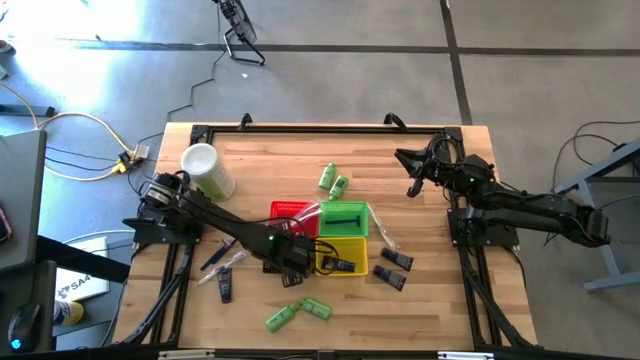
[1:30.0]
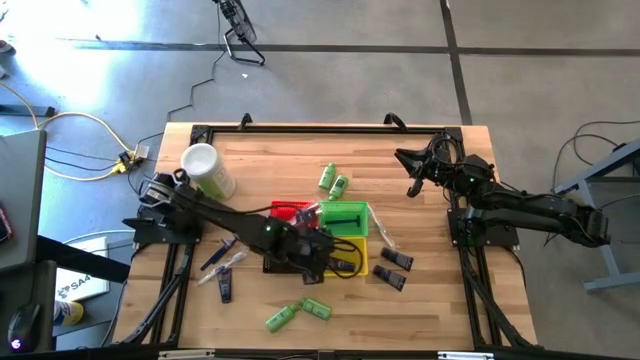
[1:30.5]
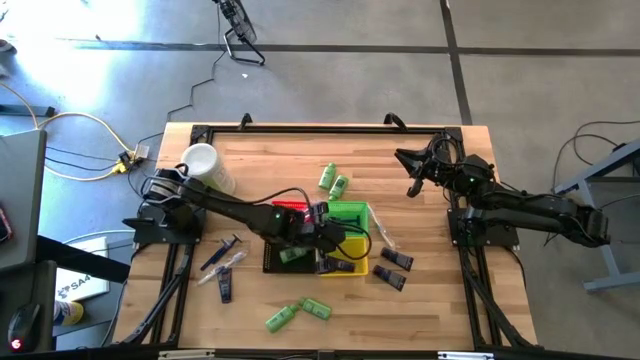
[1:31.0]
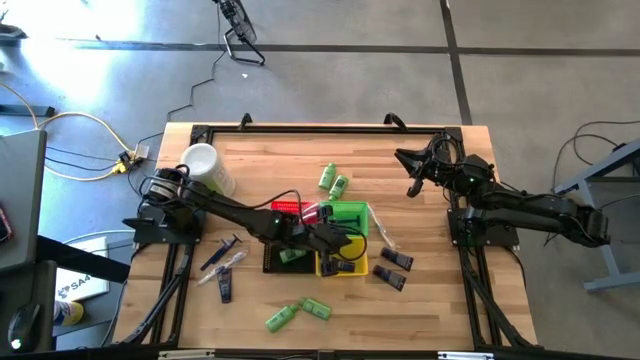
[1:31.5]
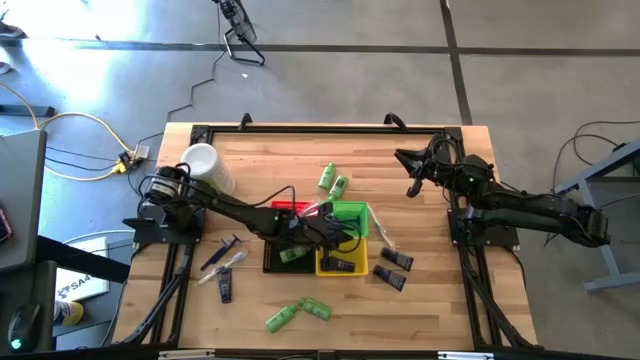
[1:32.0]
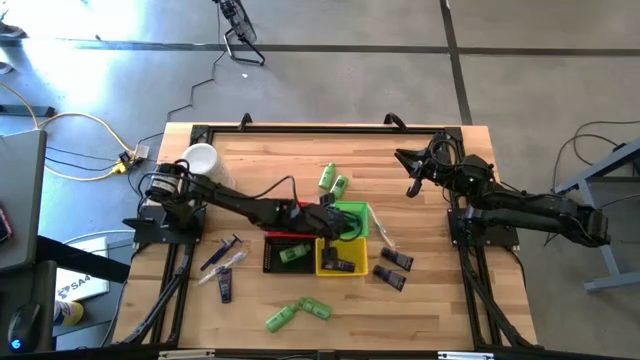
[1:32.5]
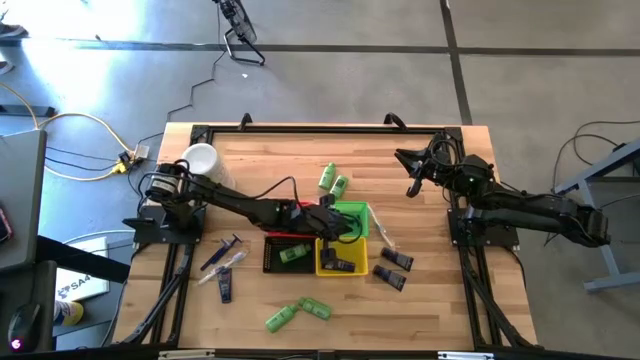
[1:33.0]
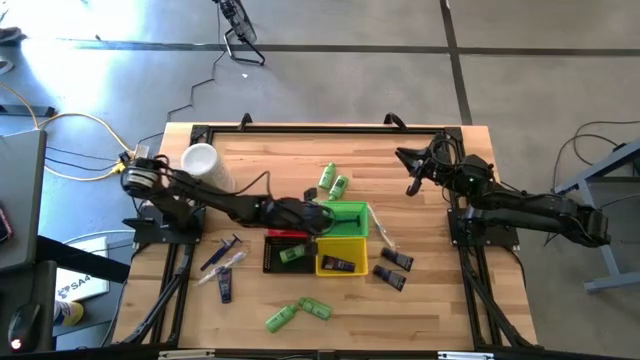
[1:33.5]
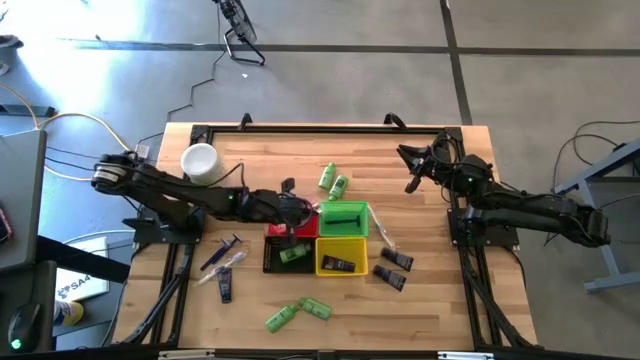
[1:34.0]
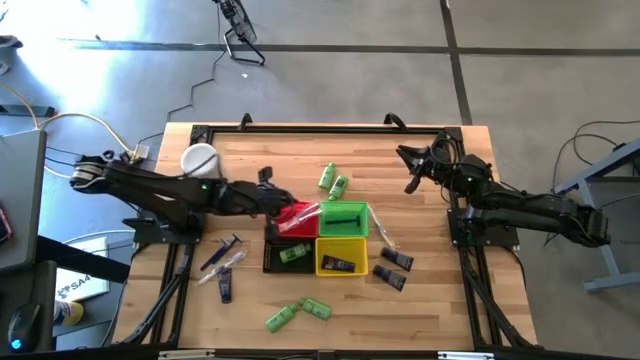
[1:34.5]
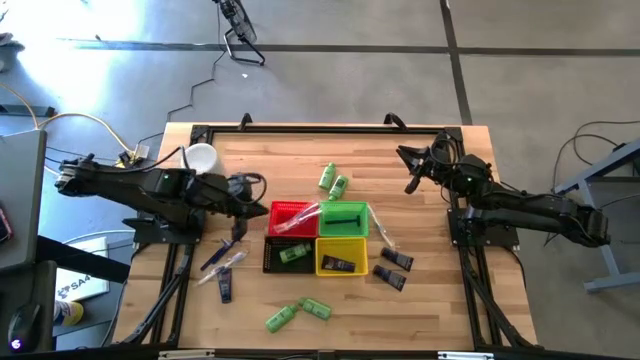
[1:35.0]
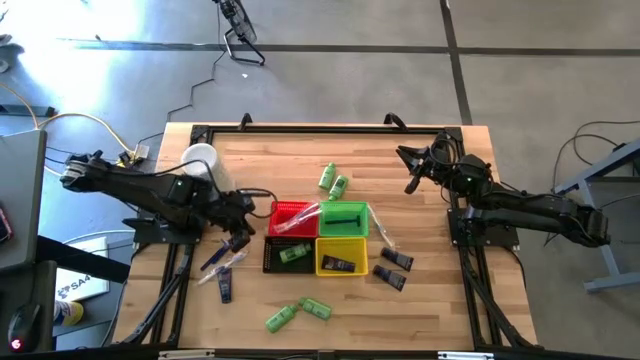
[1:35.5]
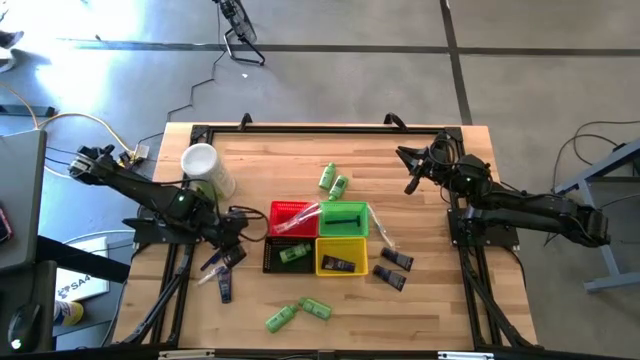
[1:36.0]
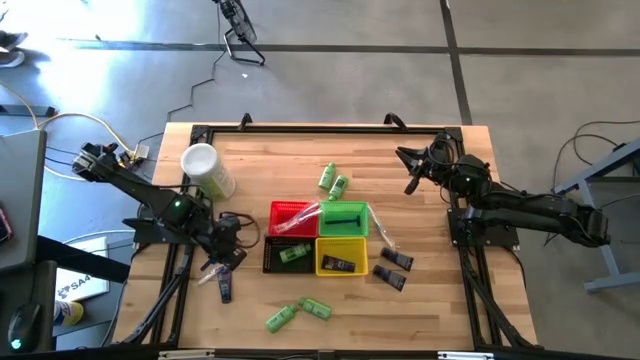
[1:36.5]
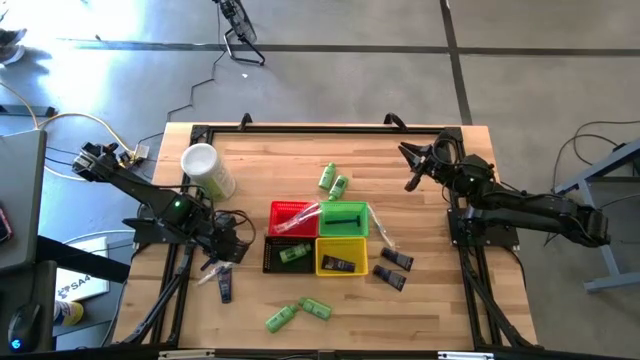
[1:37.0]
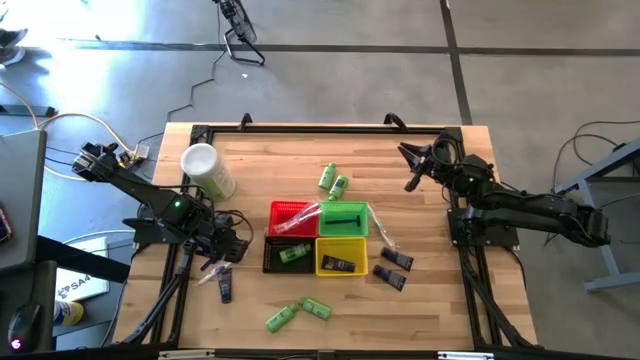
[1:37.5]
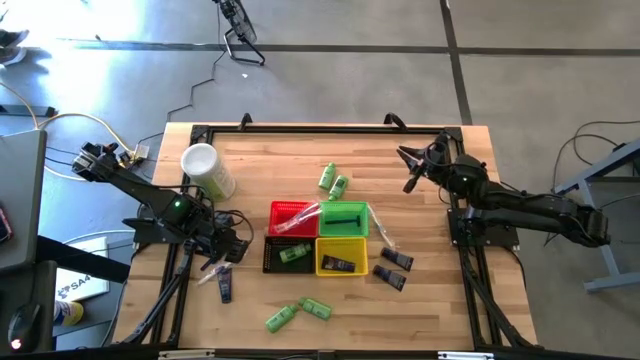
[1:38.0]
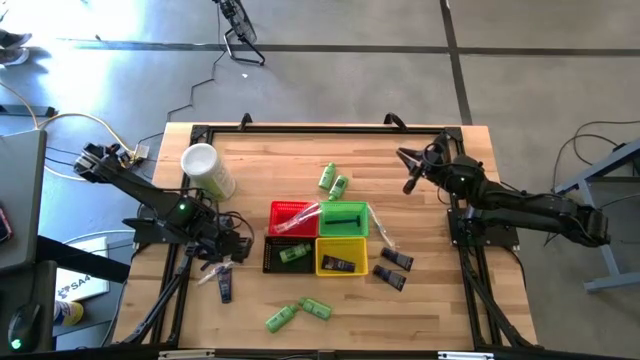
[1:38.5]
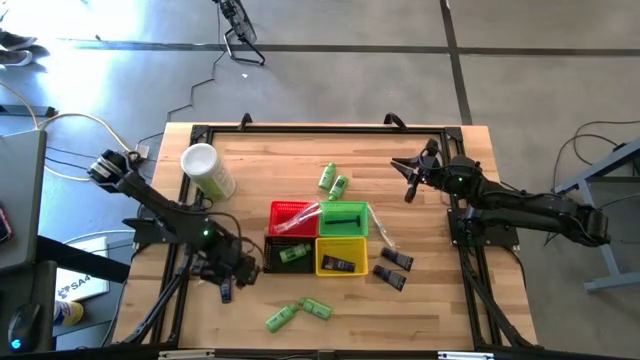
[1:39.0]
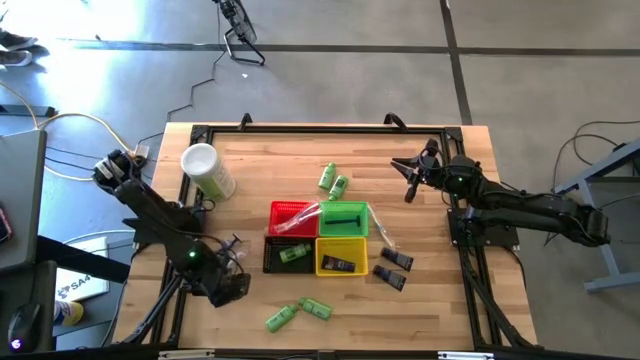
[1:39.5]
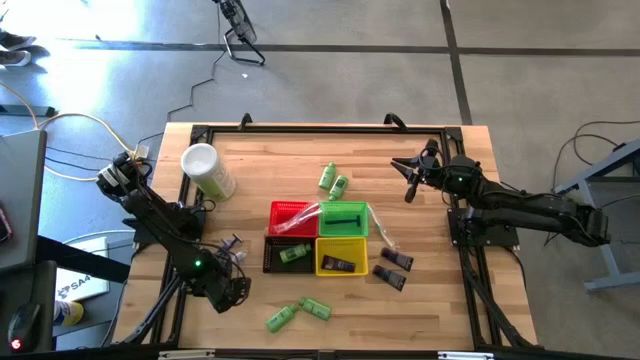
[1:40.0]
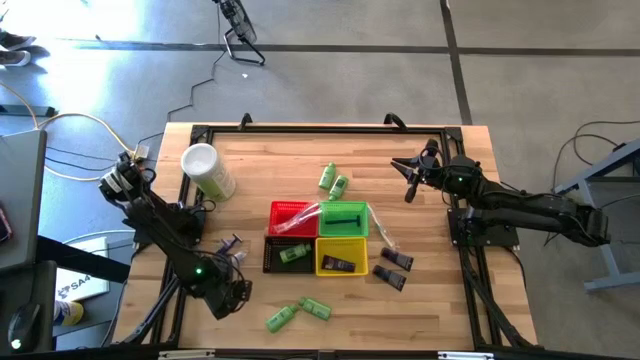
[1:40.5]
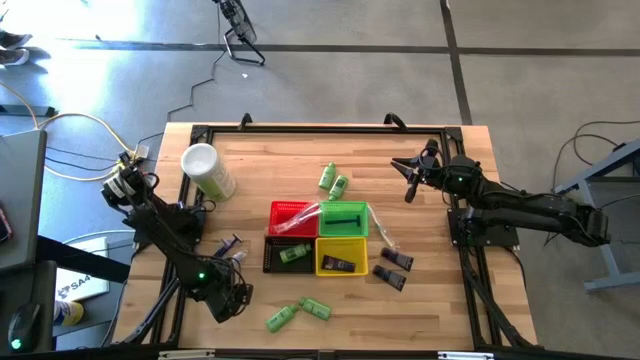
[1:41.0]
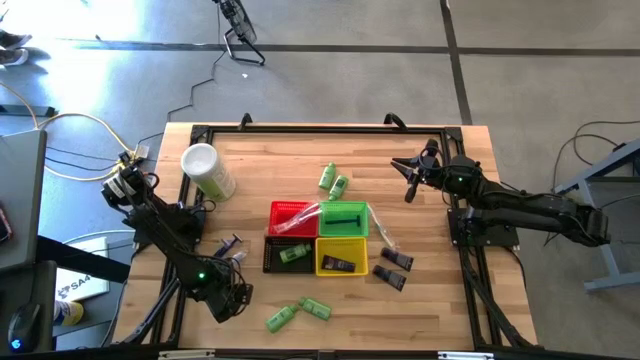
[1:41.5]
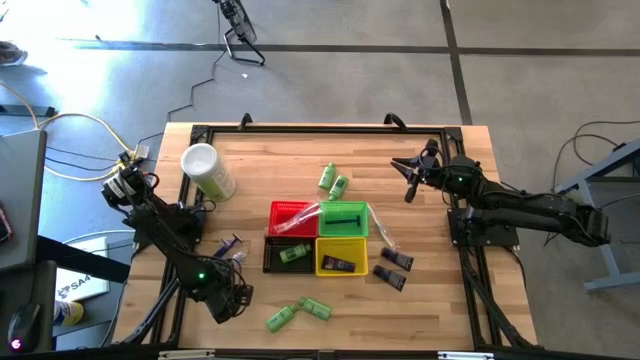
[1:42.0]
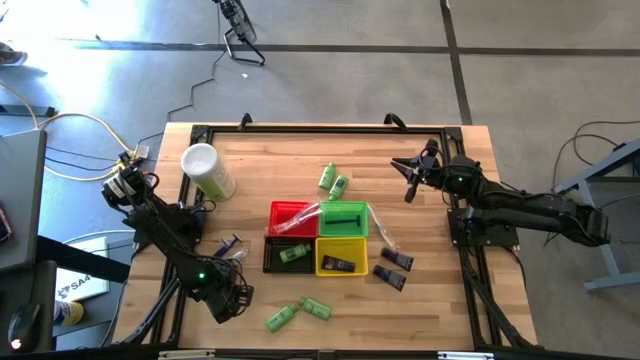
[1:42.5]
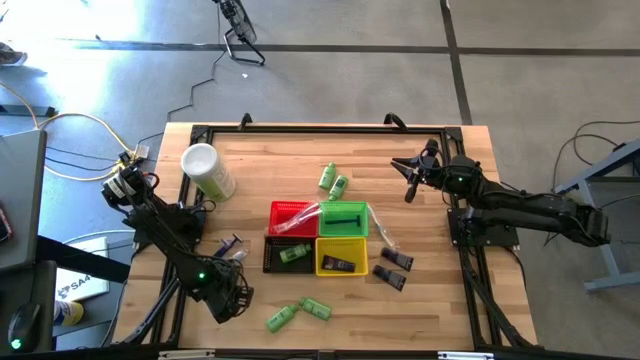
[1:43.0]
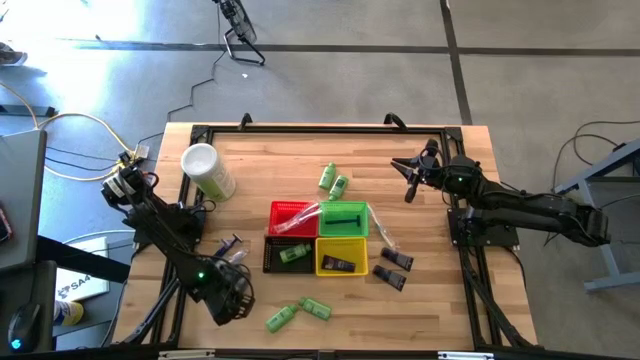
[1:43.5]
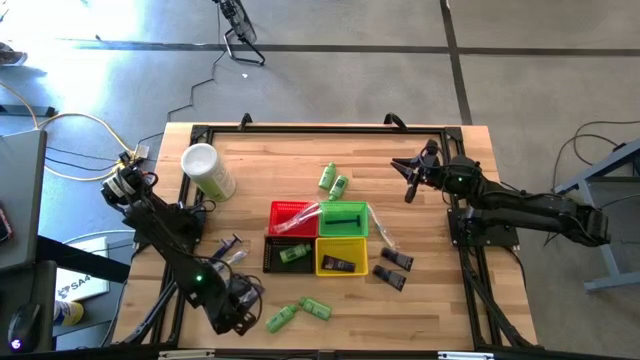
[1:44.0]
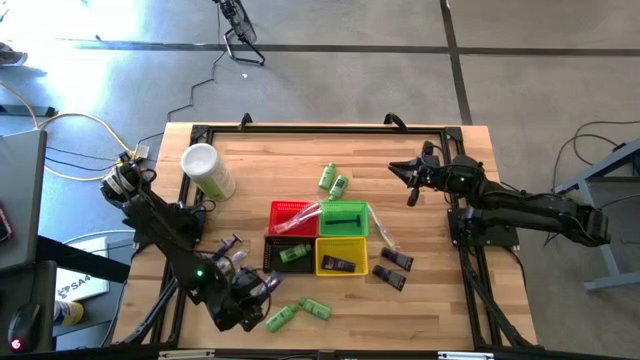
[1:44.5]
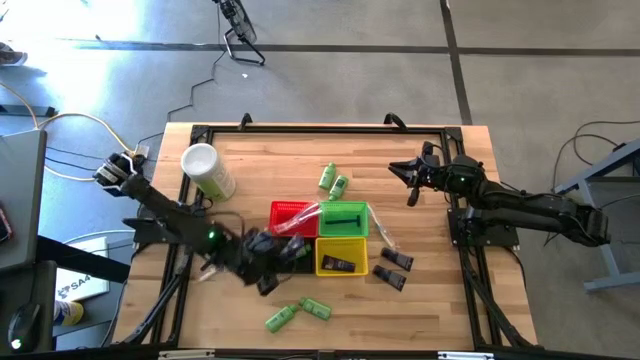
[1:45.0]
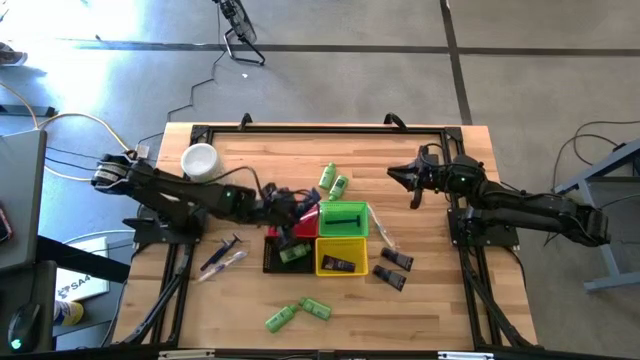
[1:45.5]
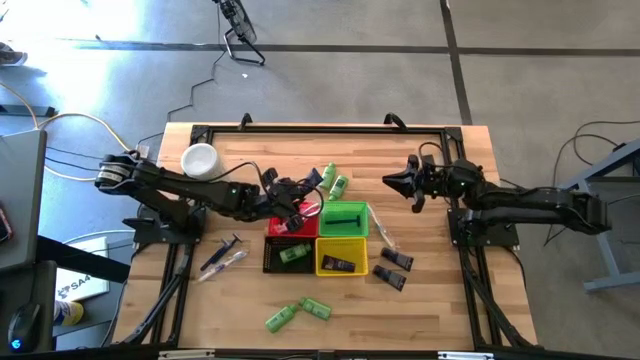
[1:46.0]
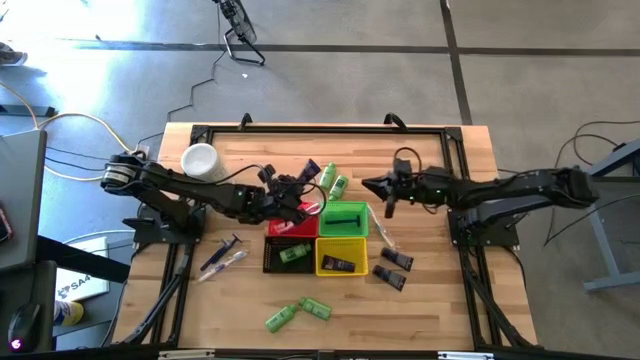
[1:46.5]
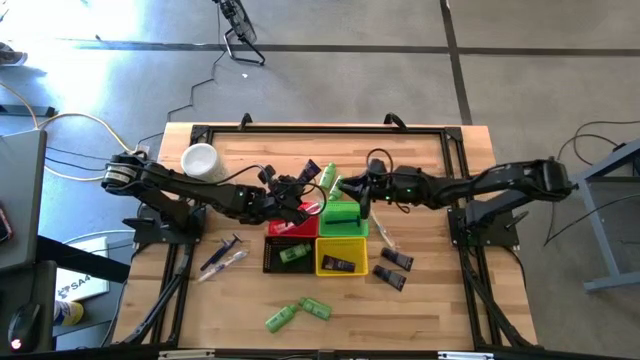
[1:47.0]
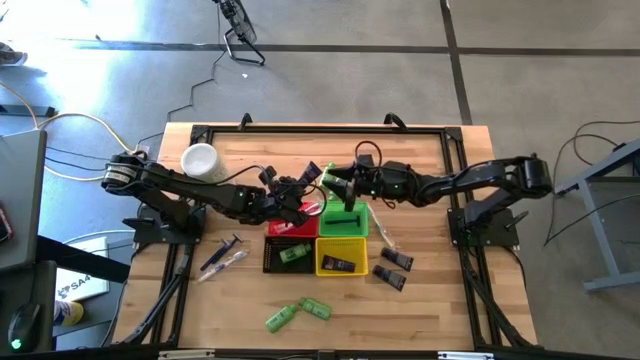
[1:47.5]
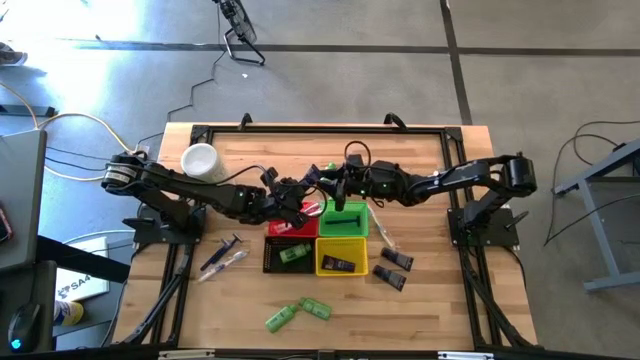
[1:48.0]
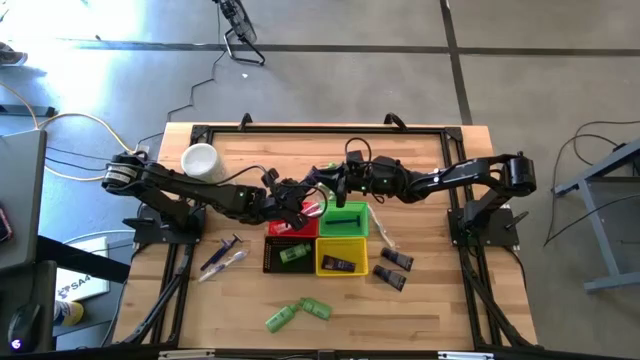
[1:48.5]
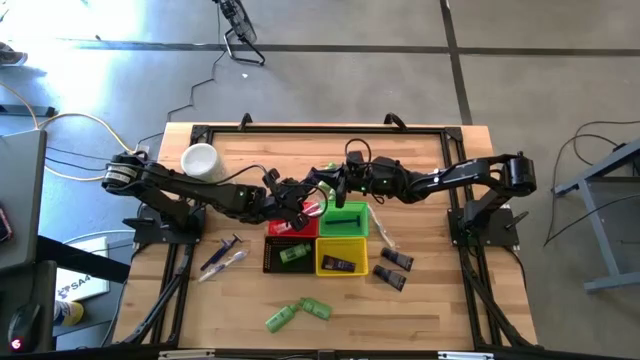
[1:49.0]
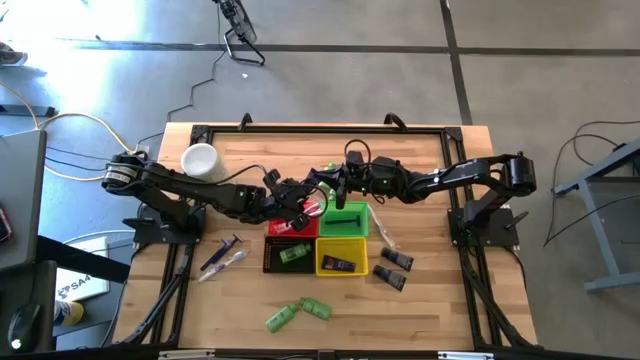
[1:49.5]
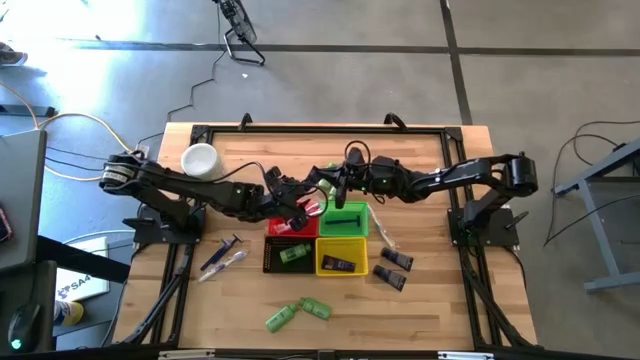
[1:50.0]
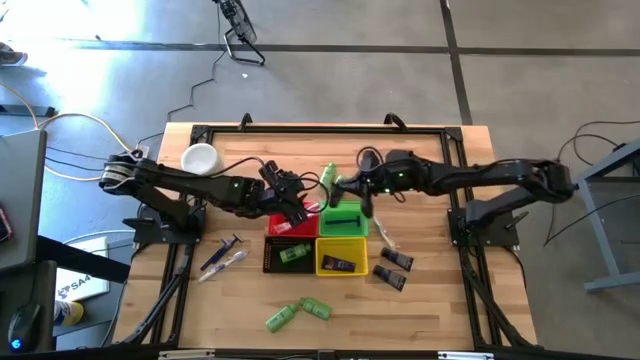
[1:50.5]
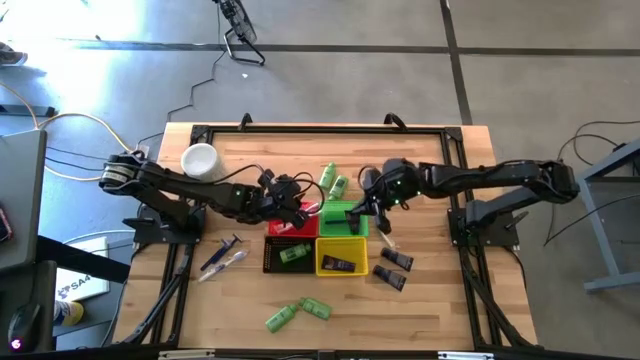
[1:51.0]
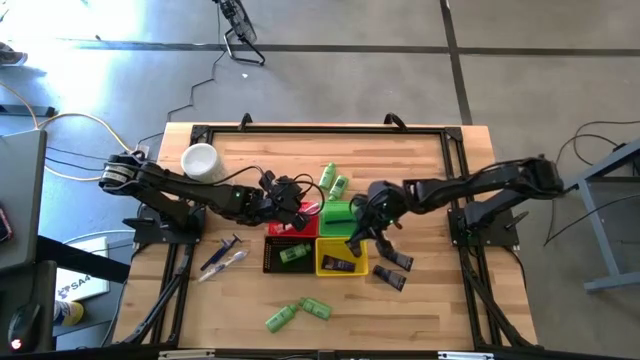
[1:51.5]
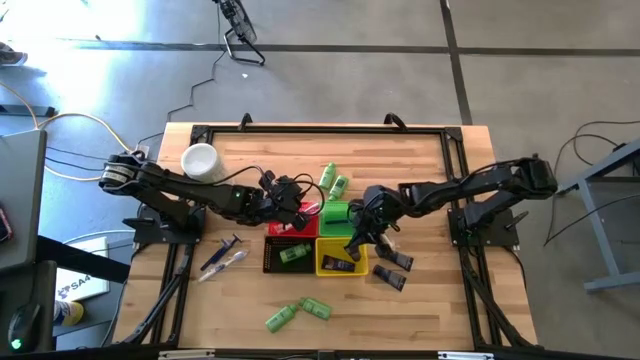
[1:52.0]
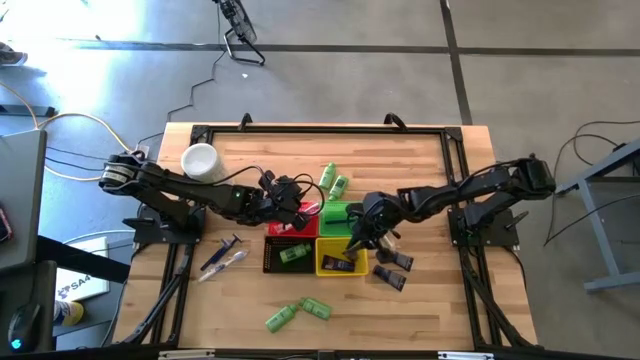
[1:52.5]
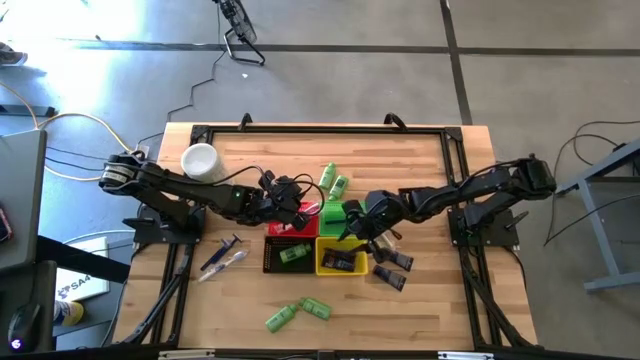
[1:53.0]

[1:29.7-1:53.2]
Task: Pick & Place Travel size toiletries
Put the dark blue shaving cream into the yellow bin
